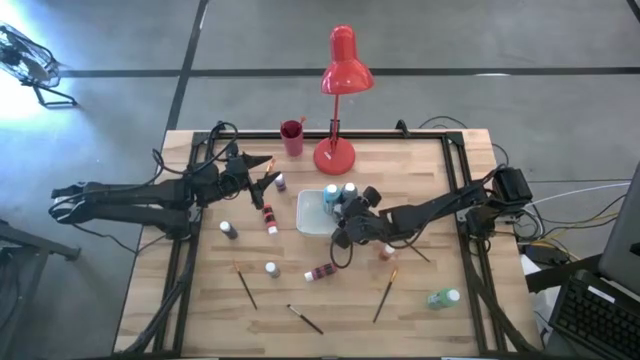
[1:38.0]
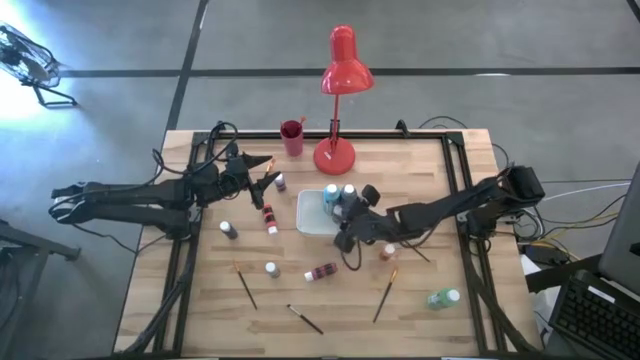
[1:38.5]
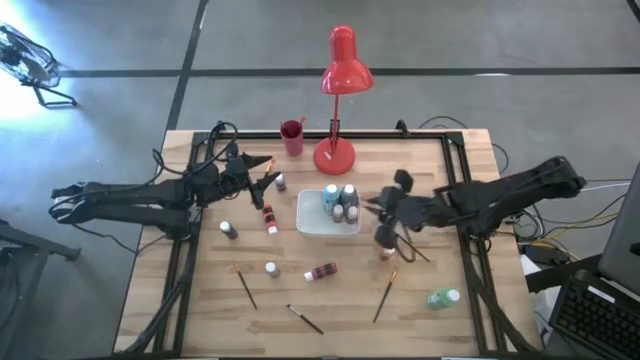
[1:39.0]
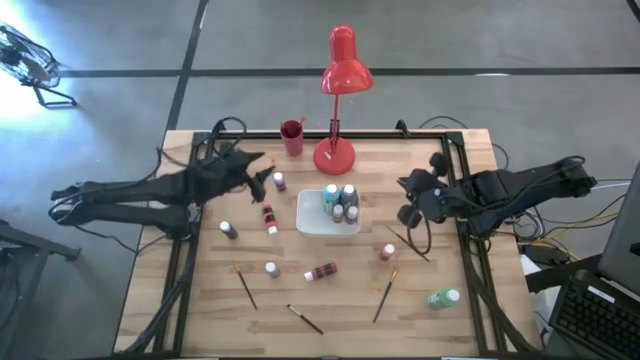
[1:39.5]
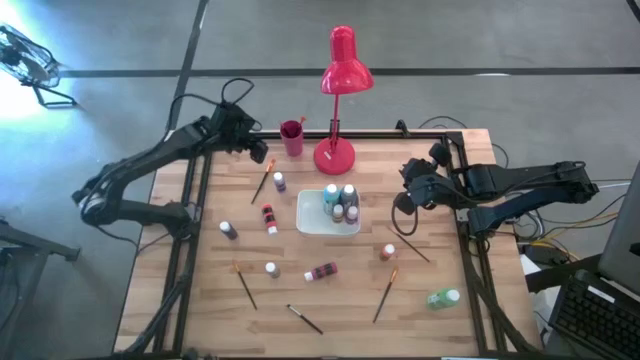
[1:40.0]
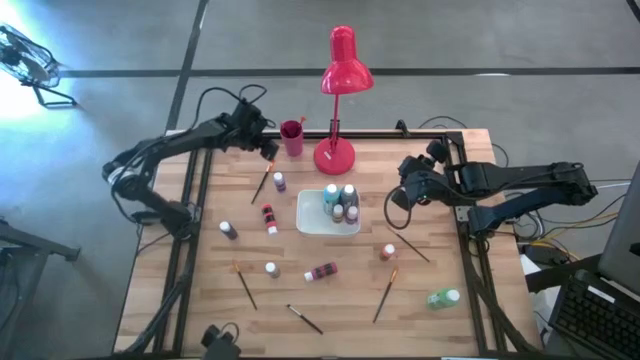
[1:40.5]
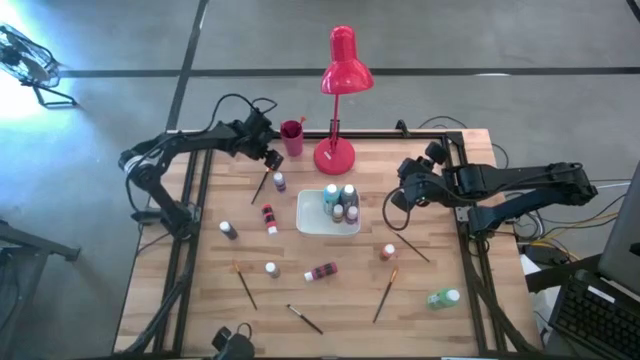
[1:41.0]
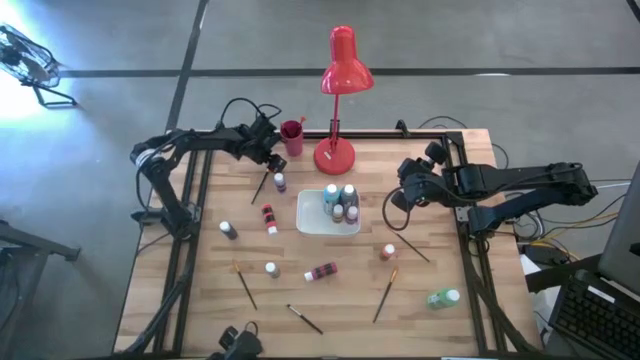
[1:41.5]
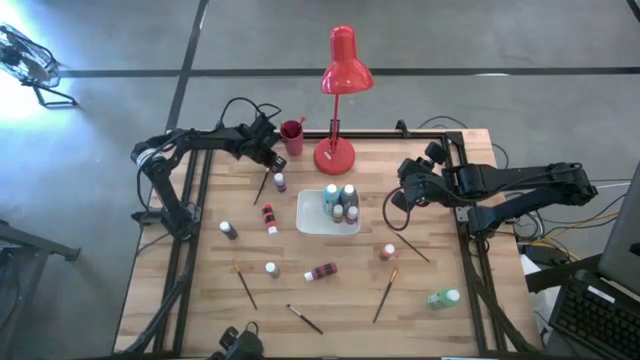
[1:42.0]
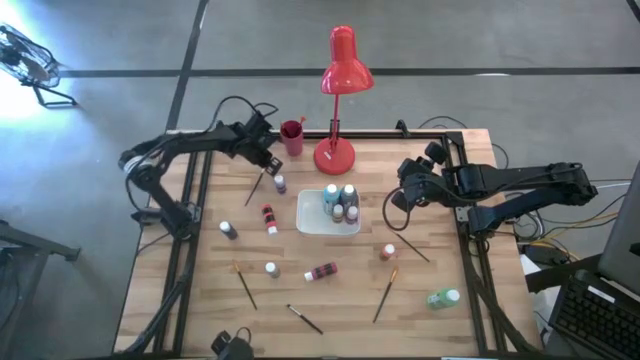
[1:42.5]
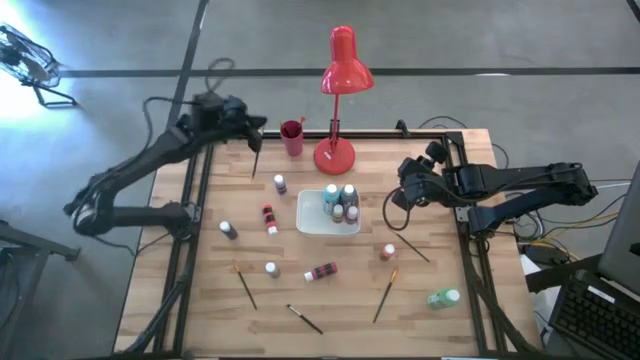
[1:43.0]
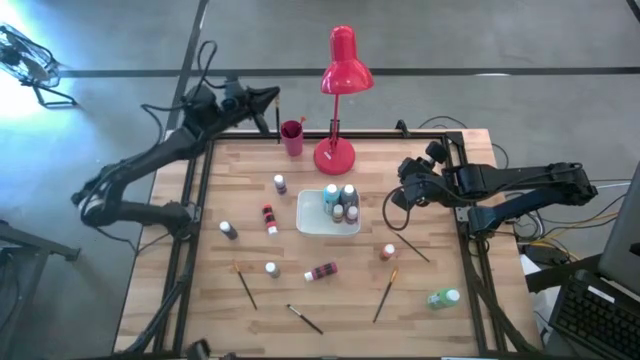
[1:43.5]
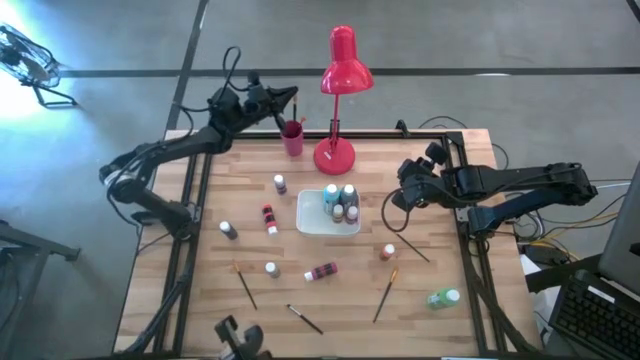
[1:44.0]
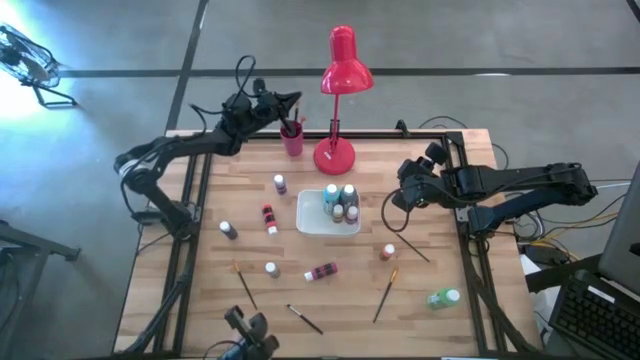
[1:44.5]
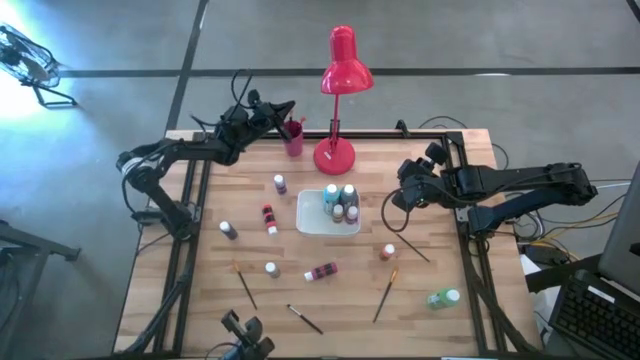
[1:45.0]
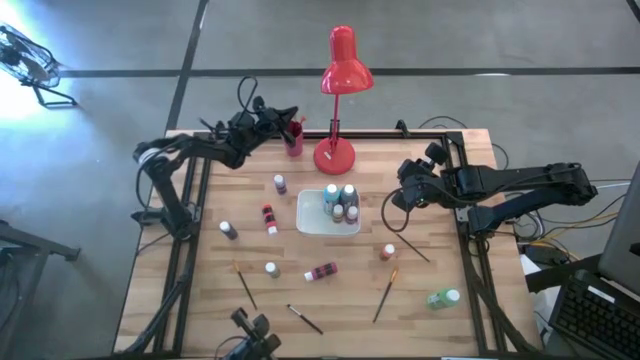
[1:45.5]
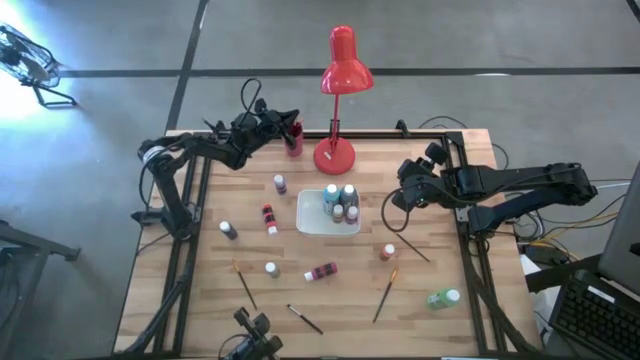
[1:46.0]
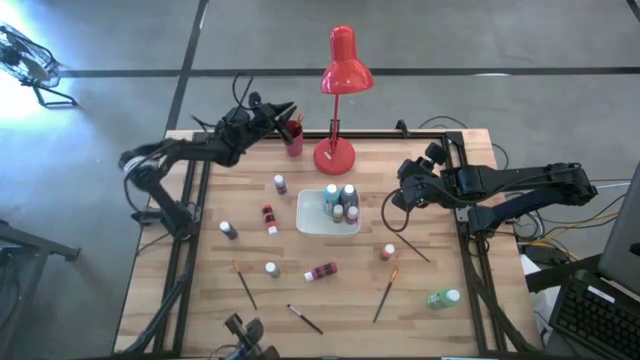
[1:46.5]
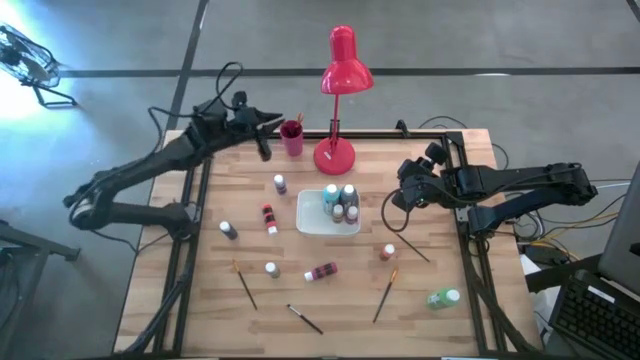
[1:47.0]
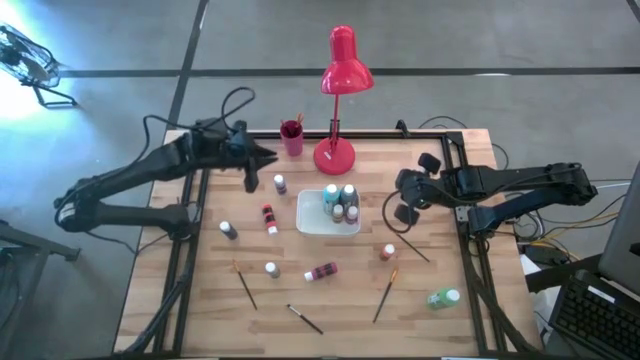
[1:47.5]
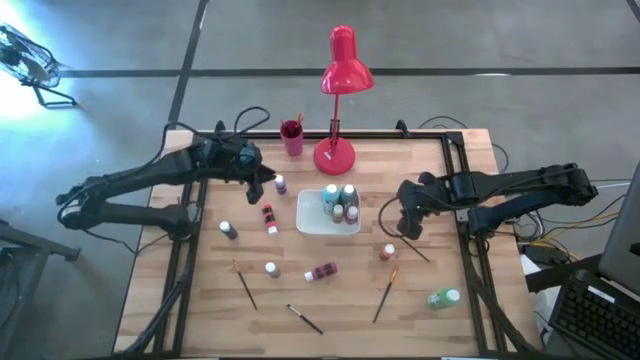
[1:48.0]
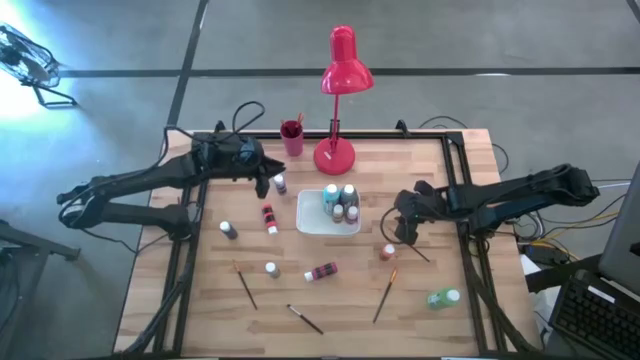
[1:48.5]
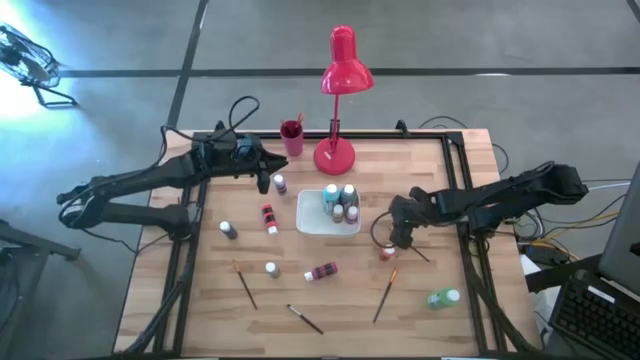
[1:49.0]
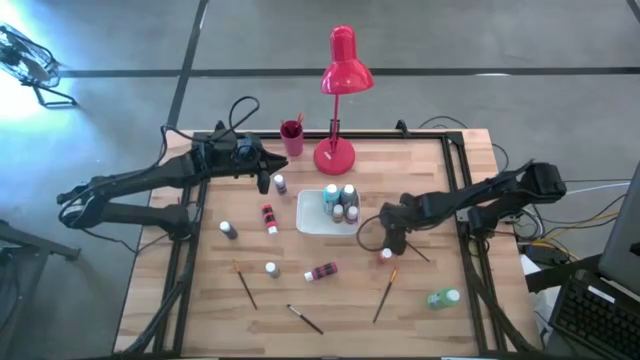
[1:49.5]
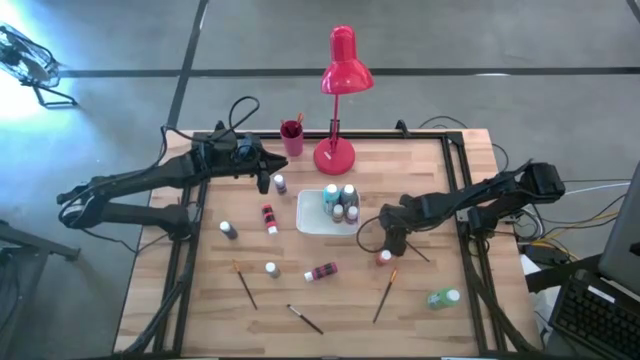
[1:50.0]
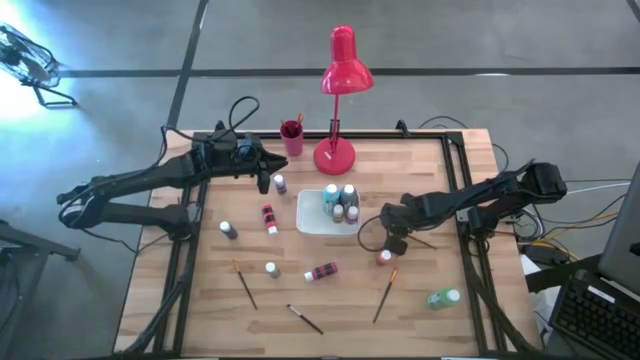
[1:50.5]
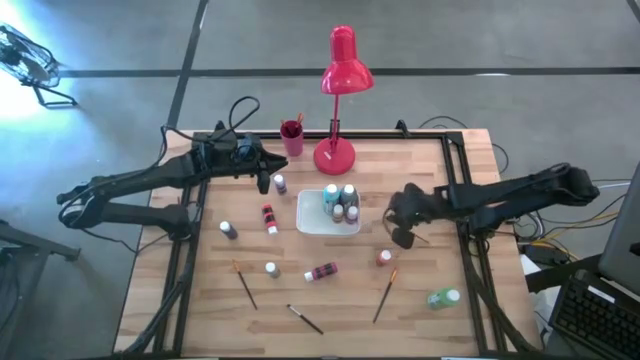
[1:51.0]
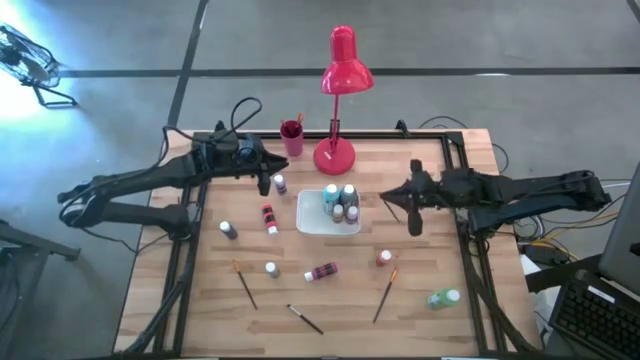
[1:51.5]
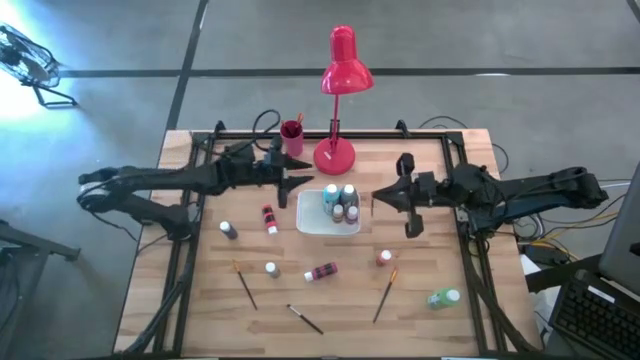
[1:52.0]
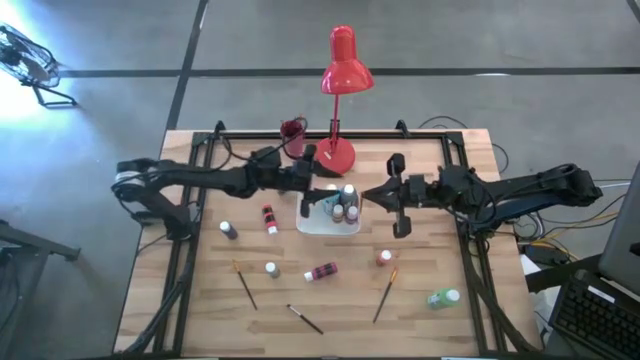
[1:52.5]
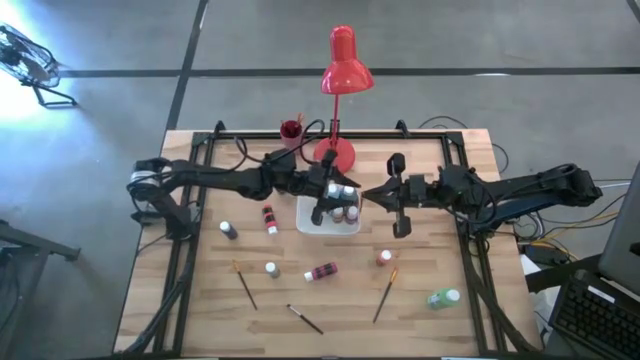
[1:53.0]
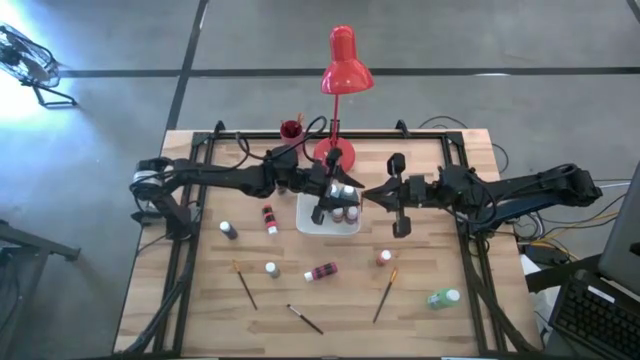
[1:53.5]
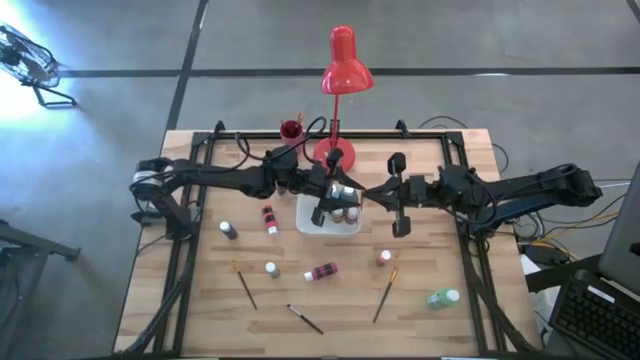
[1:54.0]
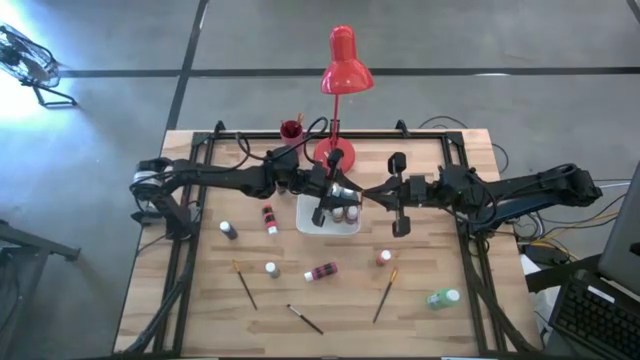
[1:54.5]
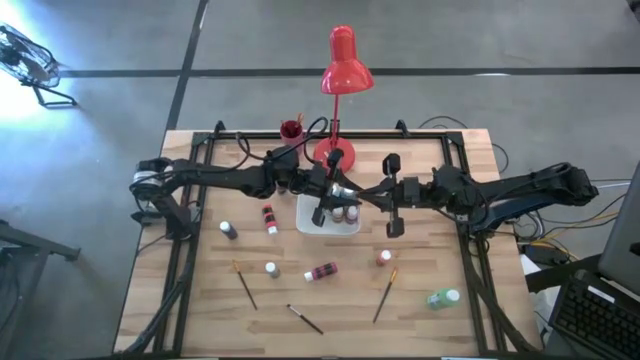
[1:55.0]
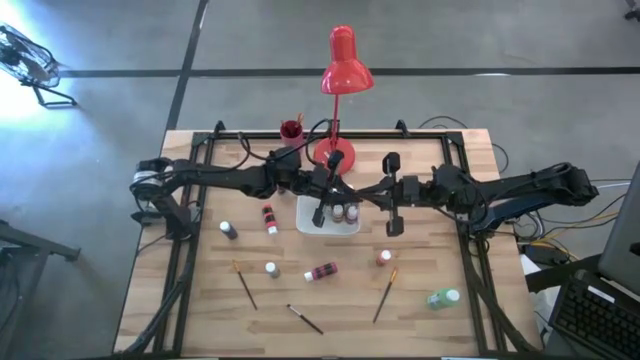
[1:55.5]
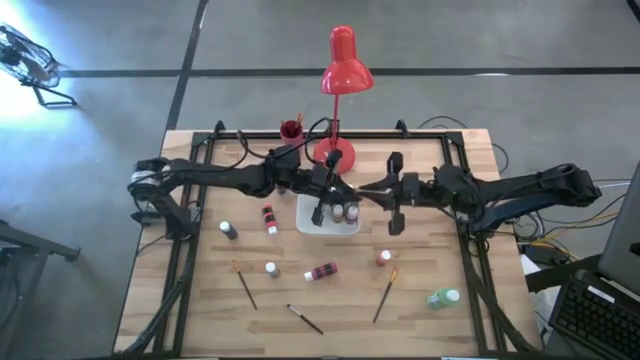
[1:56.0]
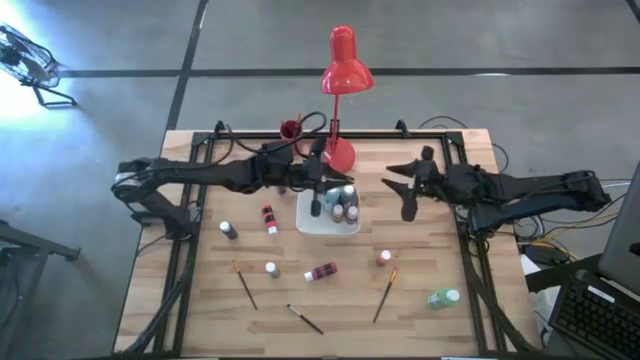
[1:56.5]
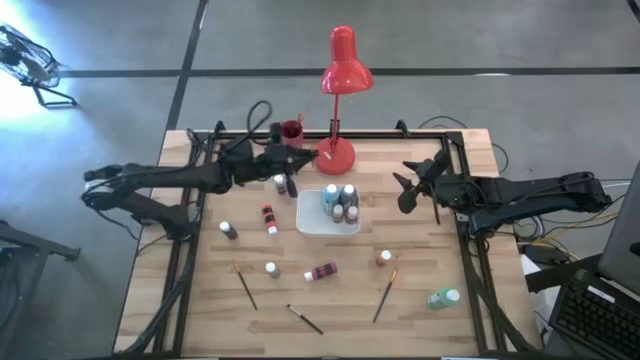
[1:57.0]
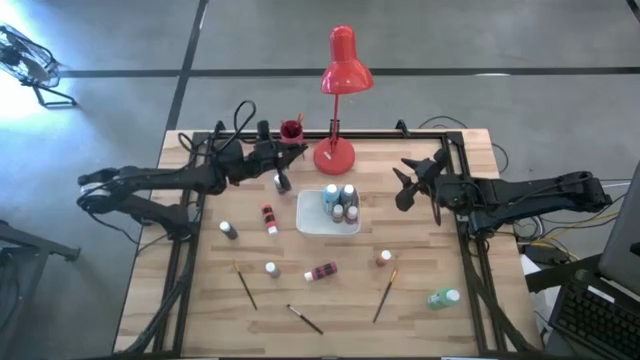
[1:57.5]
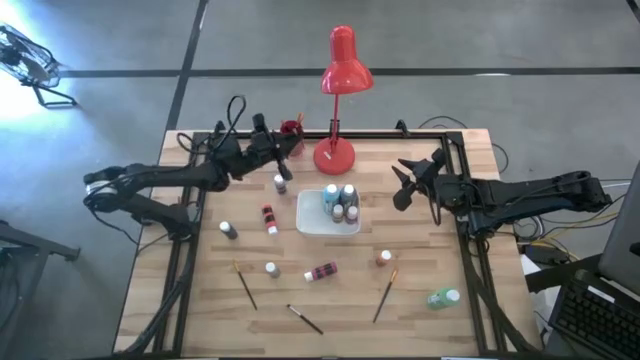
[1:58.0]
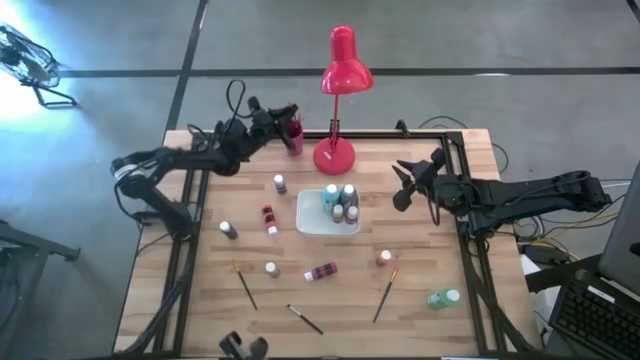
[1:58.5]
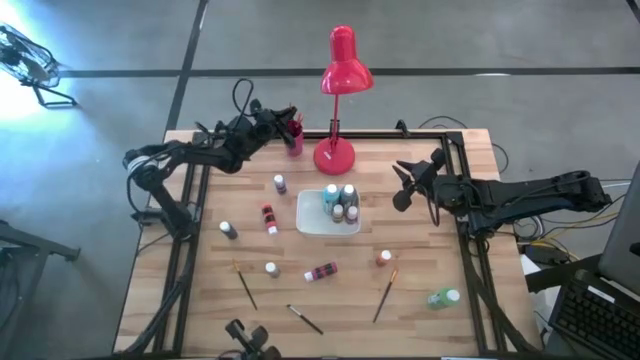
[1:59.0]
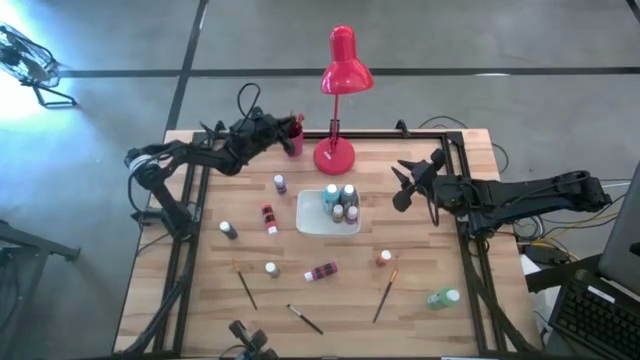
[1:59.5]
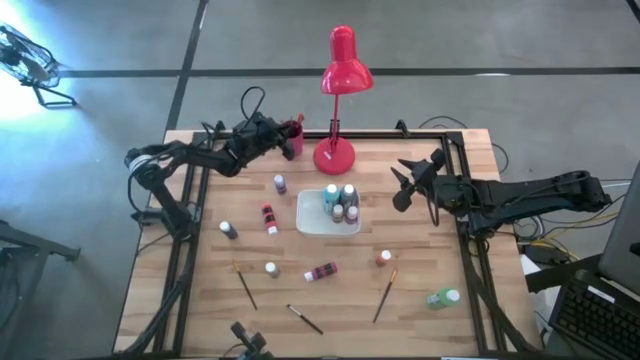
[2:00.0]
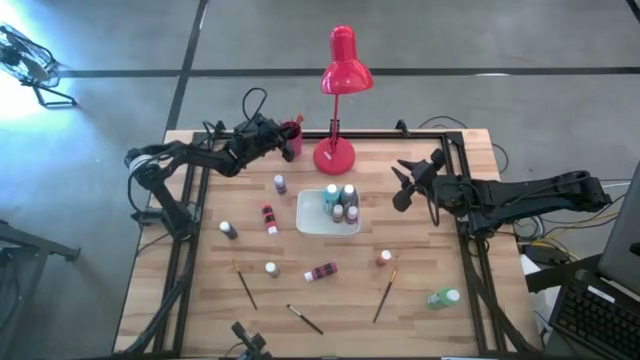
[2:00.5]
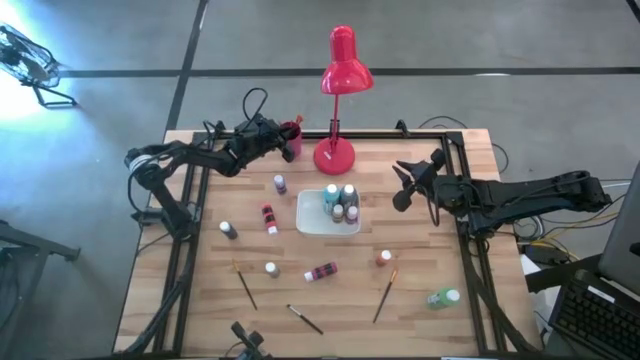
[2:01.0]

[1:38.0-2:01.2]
Task: Pick & Place Paint Supplies
Put the gold paint brush into the red cup
